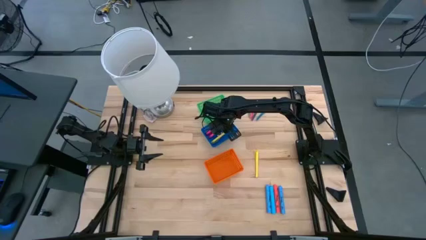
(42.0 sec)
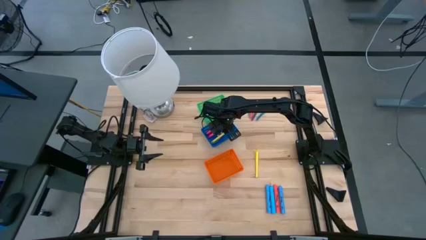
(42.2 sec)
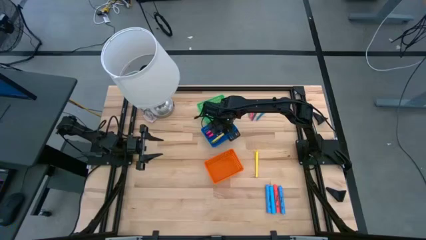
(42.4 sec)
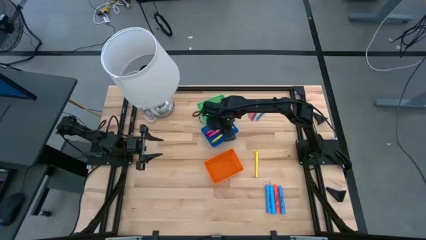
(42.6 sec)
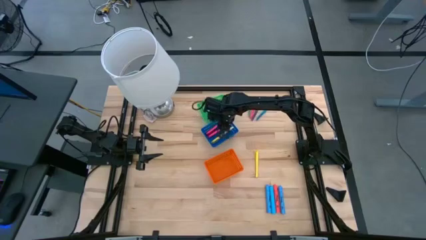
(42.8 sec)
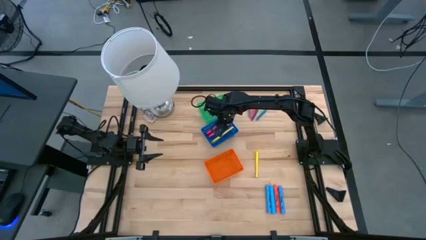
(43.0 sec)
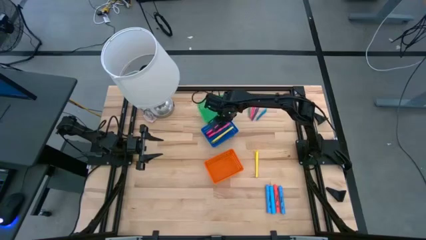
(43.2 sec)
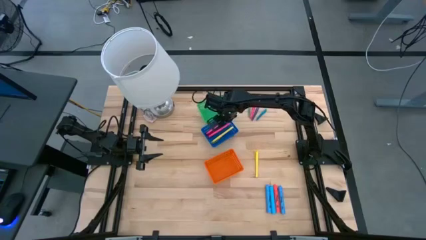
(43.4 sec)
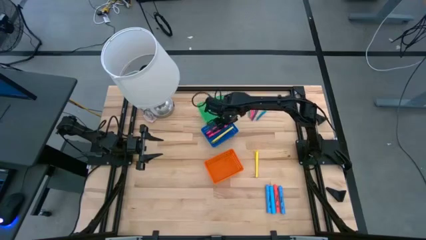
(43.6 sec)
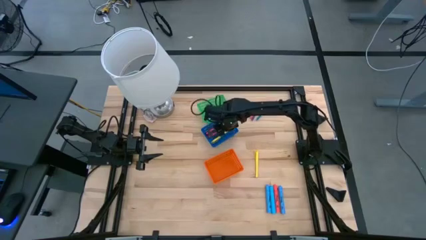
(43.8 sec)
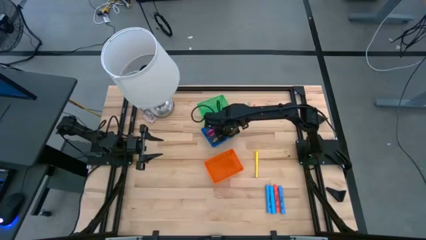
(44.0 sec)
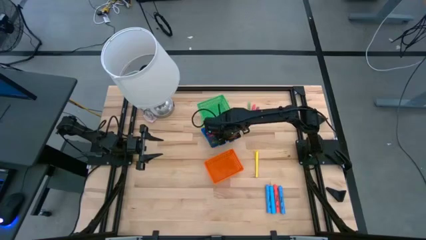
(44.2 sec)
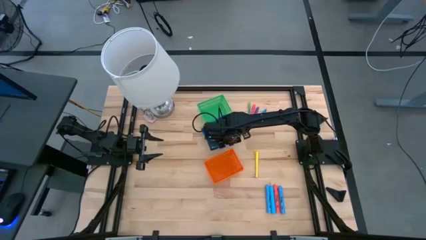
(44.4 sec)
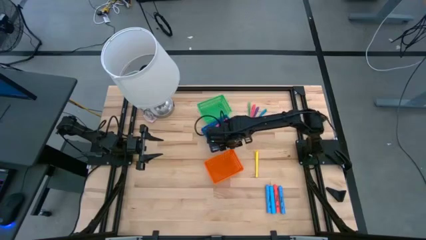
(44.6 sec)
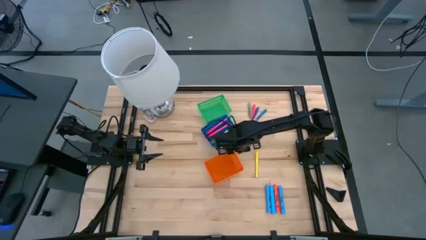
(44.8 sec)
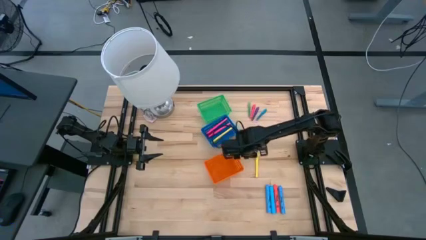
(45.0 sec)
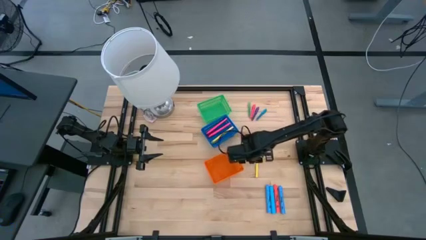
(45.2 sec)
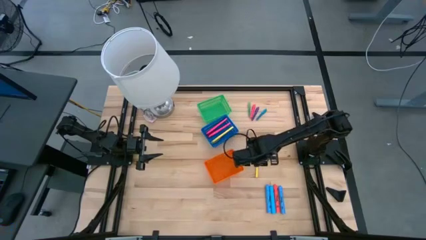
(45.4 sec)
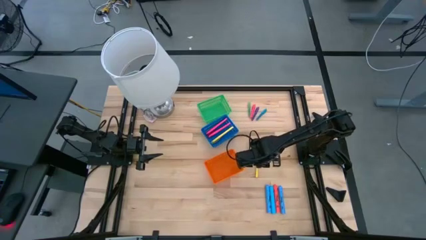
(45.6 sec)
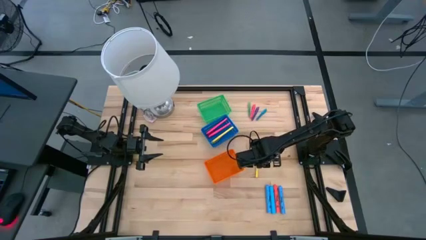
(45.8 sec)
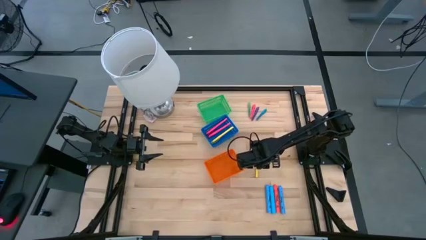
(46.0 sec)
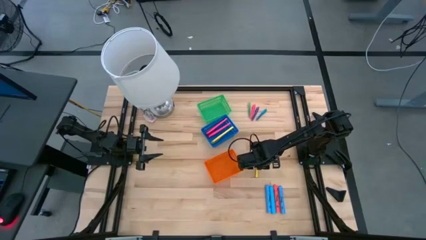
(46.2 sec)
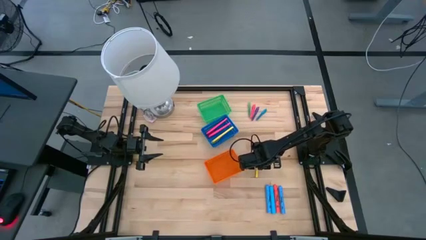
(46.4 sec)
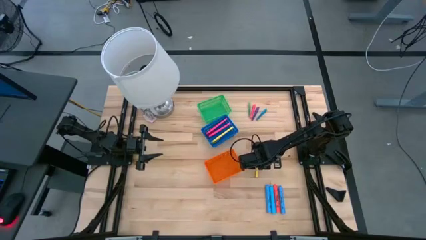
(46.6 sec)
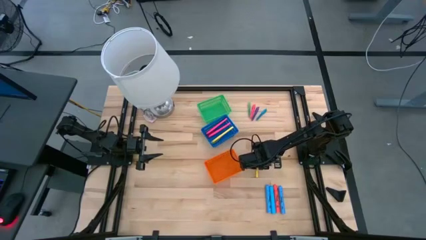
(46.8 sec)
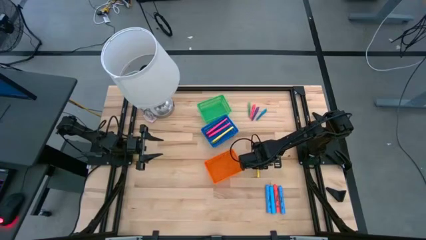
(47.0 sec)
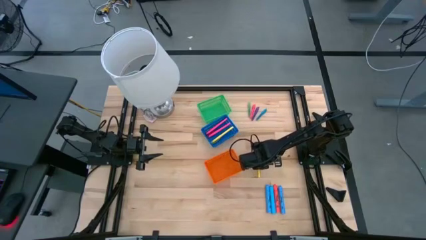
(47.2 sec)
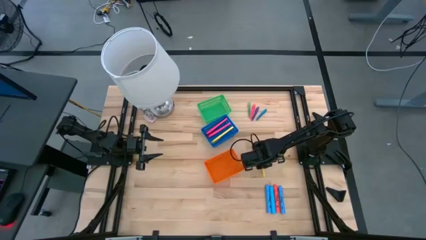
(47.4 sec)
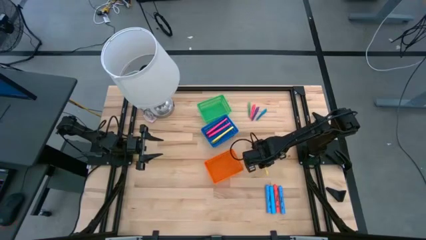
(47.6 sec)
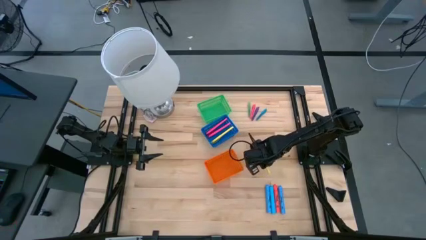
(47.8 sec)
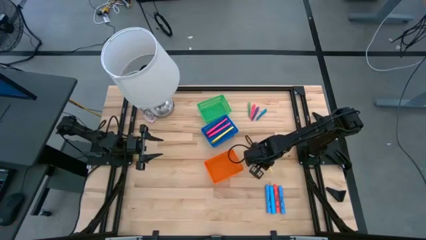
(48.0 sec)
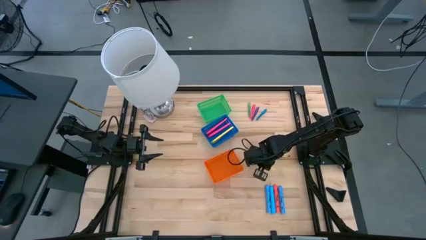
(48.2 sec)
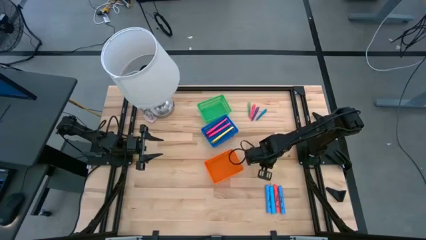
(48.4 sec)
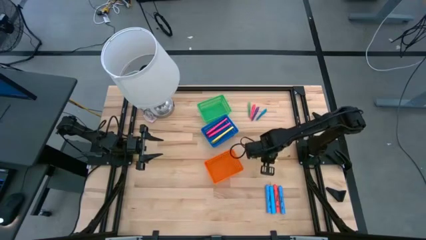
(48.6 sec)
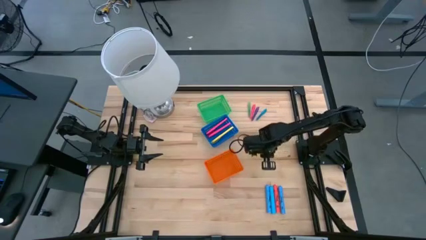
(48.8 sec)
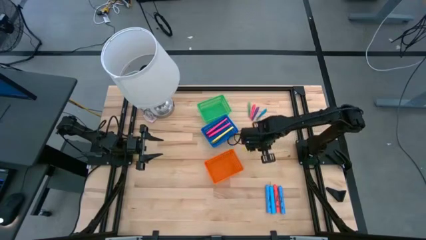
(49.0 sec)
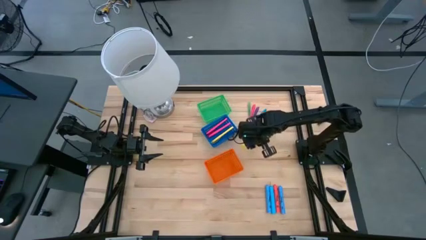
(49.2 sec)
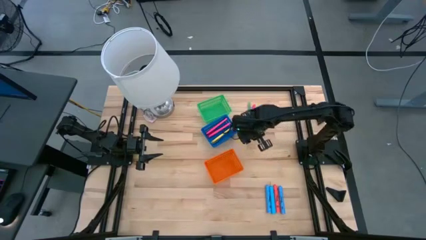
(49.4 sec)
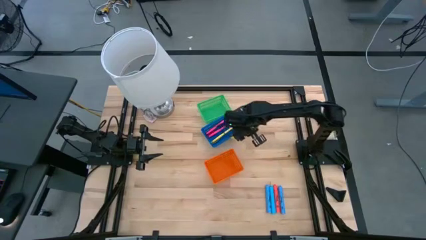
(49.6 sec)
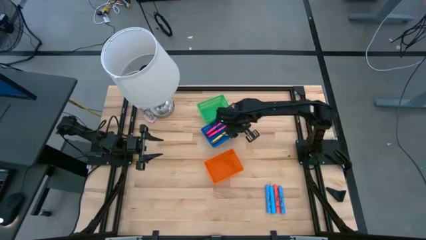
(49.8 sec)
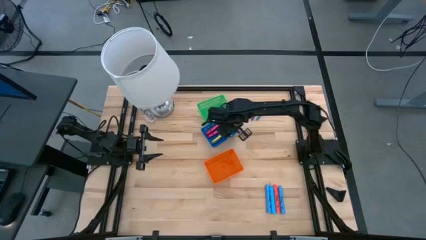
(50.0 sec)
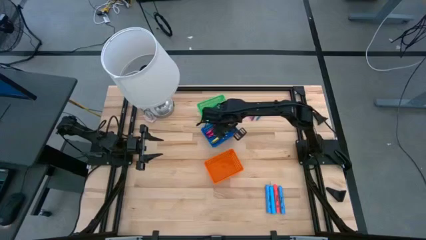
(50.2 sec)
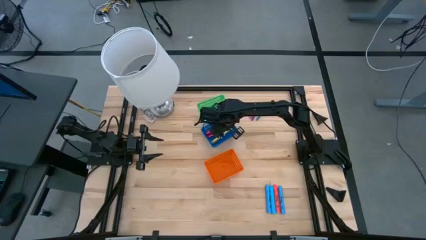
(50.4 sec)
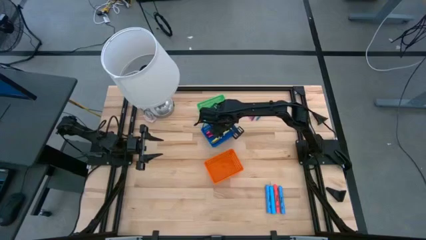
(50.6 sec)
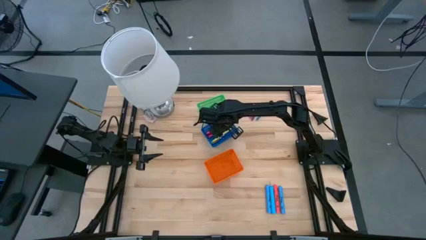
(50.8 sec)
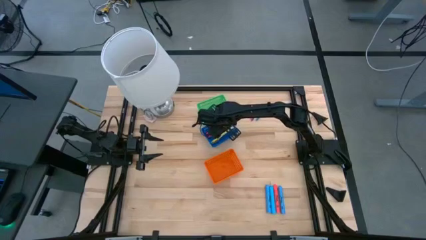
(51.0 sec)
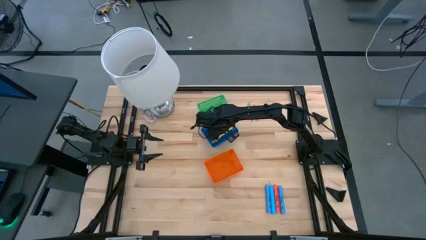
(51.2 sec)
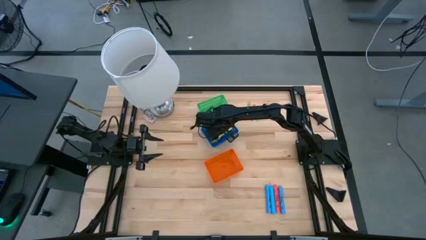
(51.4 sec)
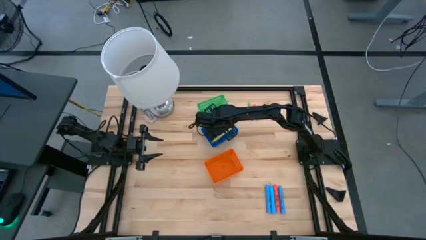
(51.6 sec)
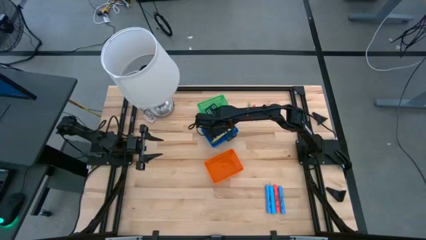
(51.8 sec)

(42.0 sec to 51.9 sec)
Task: Pick & Place Markers
Put the yellow pen into the blue bin

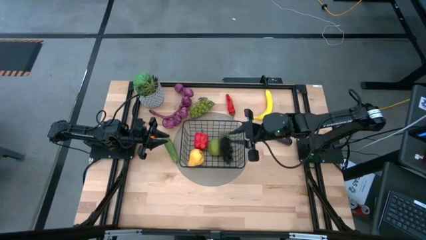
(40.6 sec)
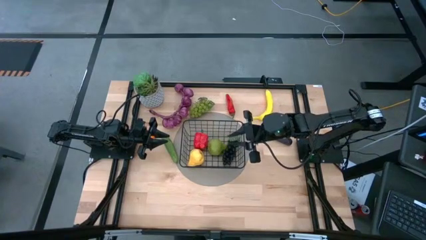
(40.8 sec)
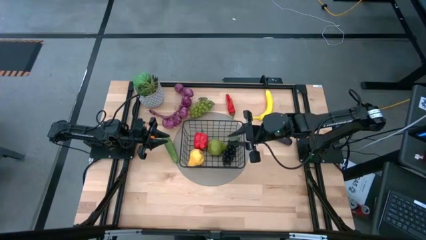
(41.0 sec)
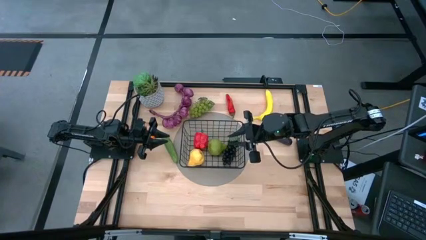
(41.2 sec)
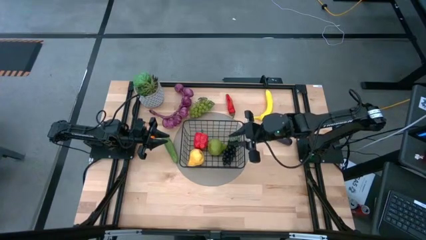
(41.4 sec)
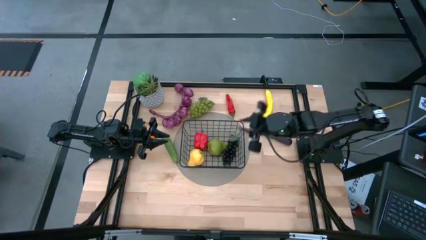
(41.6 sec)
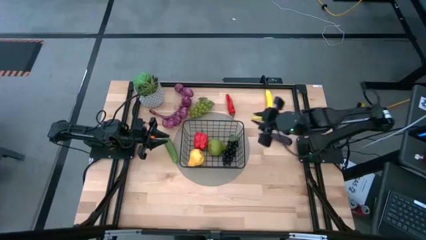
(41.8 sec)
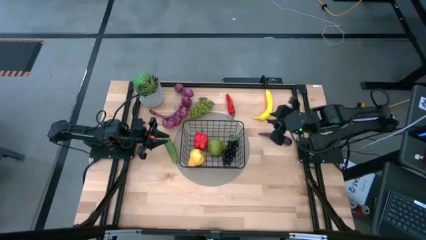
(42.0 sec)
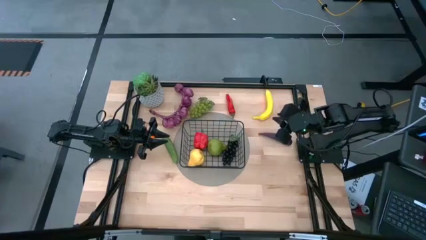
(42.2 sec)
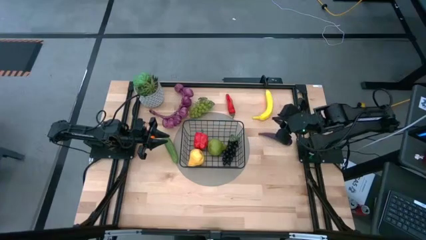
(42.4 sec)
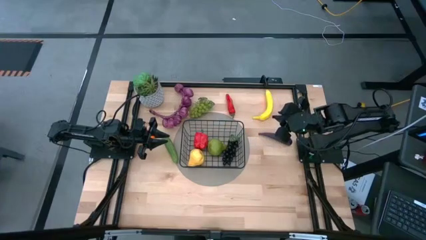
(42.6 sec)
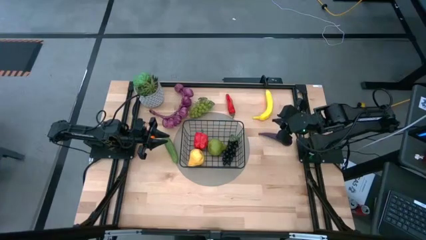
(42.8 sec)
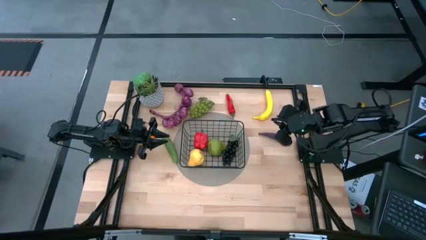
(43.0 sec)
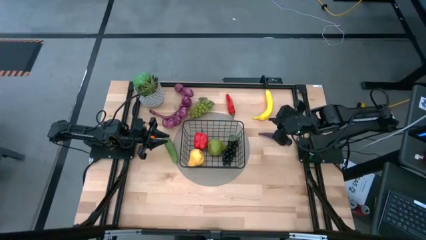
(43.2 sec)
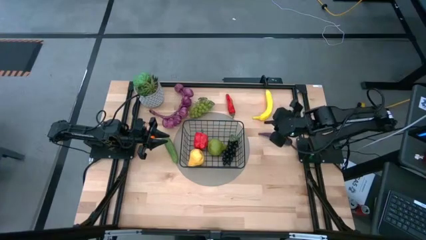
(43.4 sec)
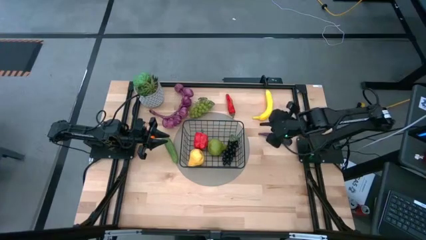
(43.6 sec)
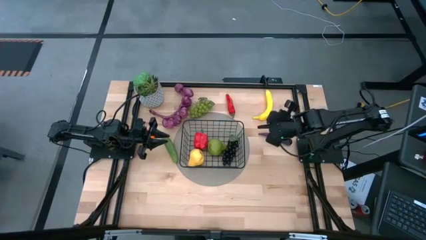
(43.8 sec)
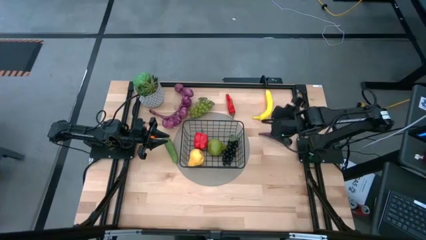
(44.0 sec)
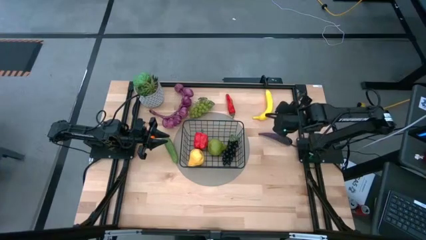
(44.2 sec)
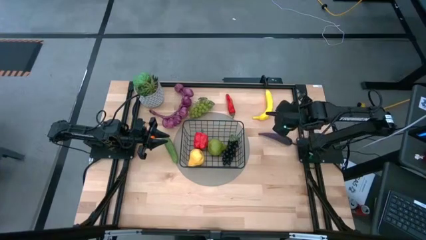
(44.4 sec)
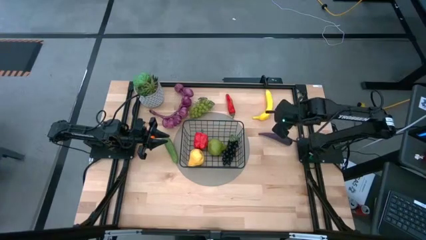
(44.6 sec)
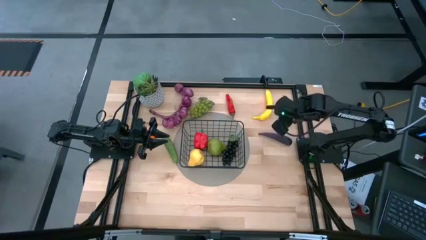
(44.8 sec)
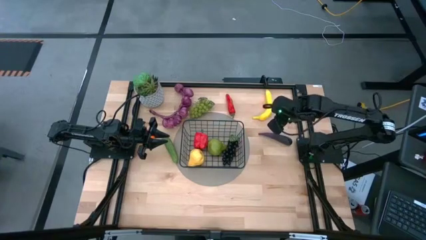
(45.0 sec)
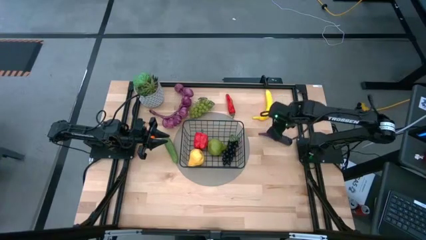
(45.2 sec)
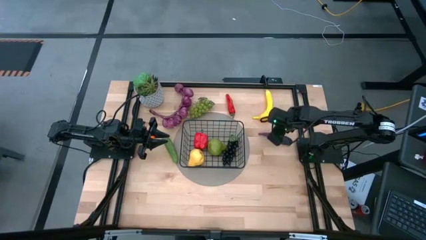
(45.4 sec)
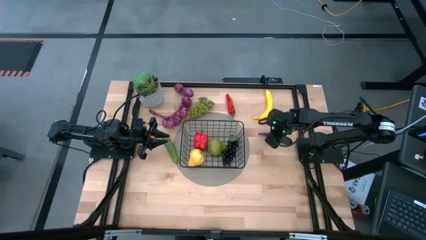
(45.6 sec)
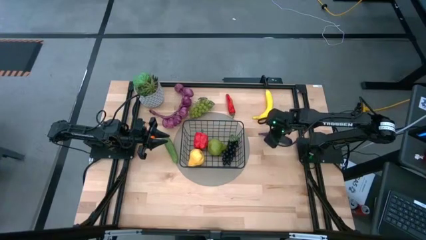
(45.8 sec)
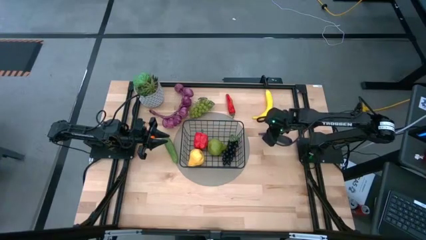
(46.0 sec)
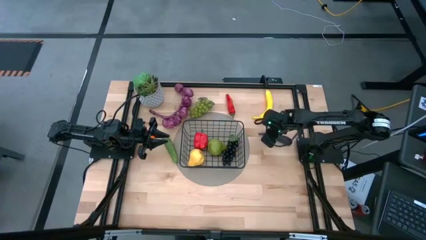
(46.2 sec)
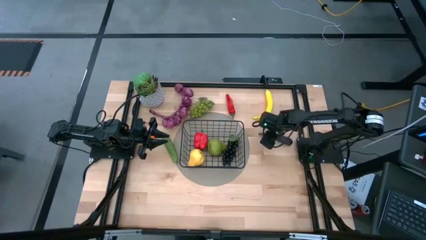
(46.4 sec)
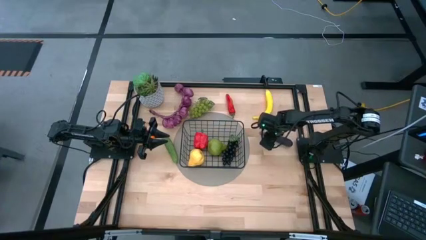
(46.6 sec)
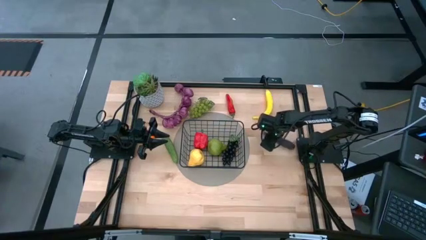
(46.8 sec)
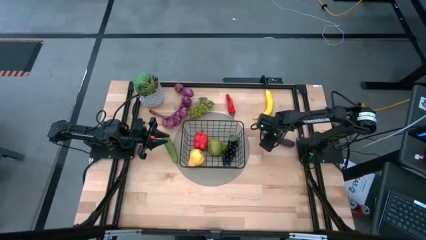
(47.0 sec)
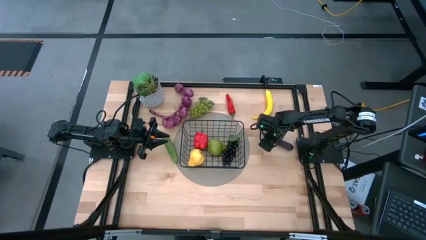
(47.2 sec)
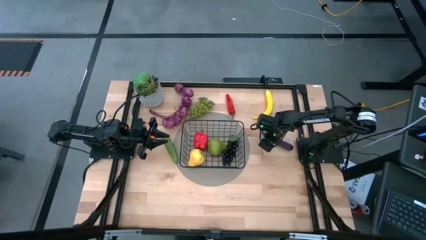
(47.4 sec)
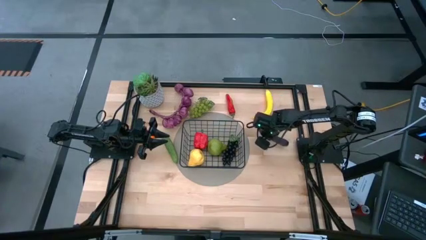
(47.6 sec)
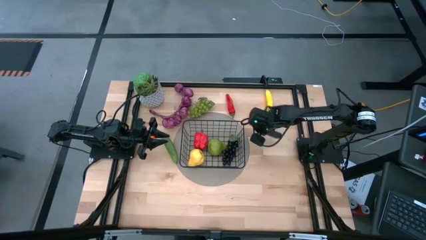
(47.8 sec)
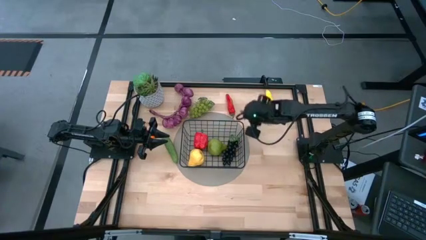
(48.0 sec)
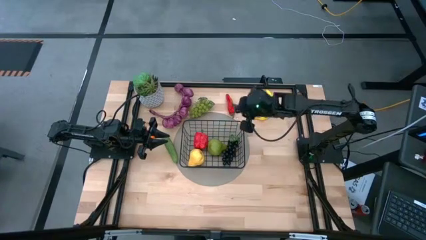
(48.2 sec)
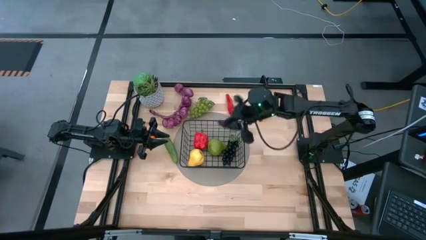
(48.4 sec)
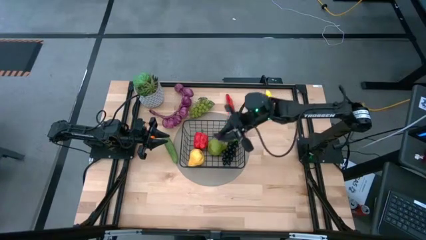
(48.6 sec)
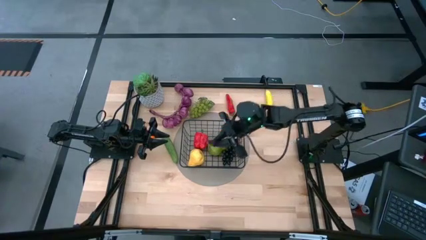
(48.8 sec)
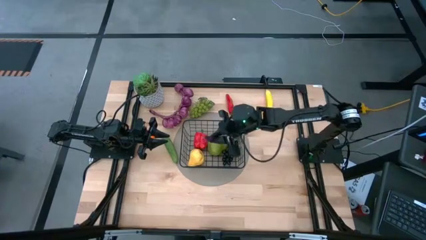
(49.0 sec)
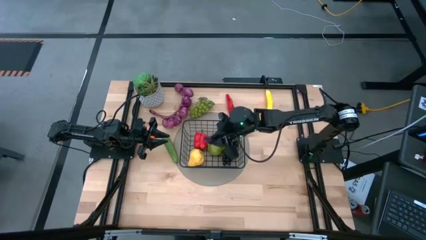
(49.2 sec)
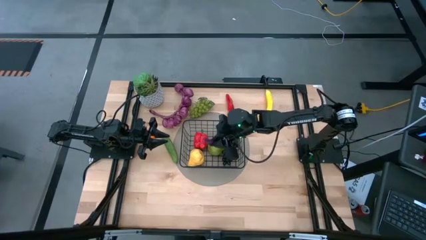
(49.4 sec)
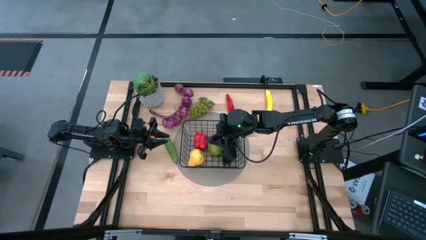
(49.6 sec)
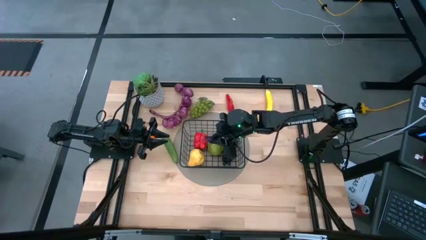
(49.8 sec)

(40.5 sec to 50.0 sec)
Task: Build produce basket
Put the purple eggplant into the black wire basket
